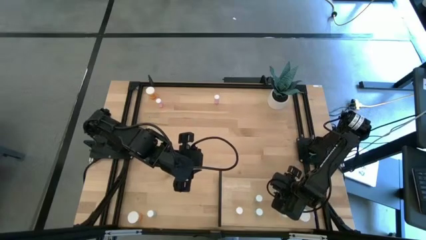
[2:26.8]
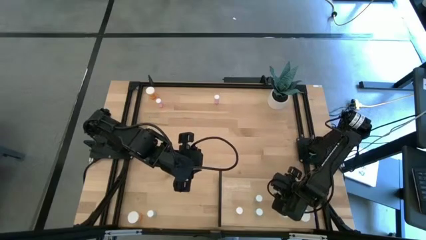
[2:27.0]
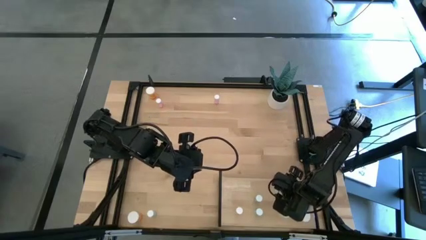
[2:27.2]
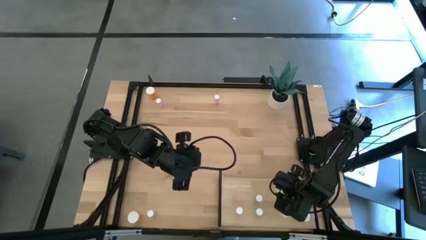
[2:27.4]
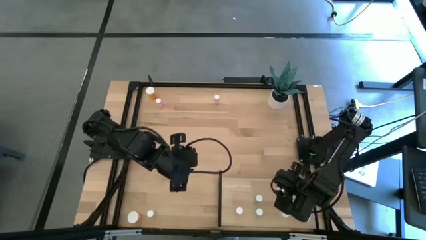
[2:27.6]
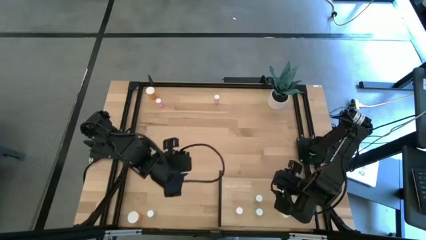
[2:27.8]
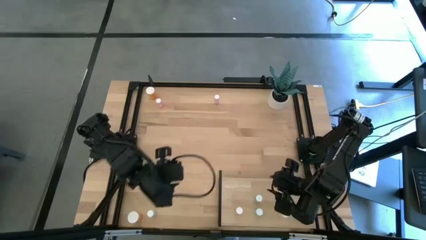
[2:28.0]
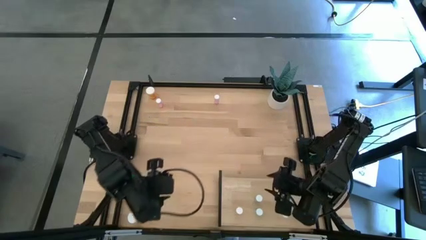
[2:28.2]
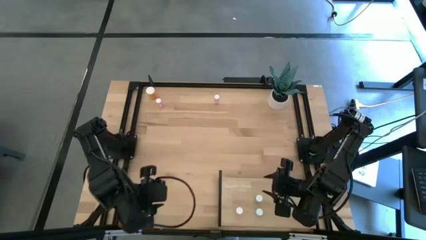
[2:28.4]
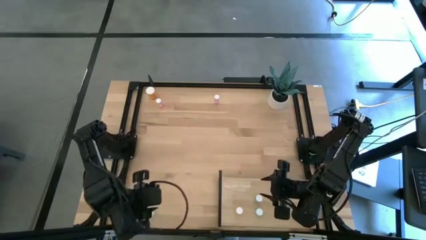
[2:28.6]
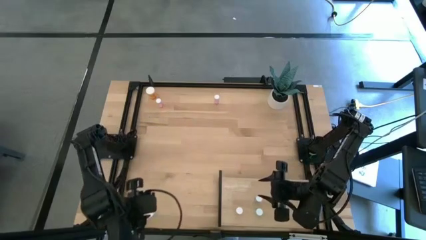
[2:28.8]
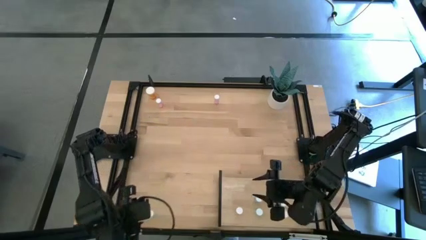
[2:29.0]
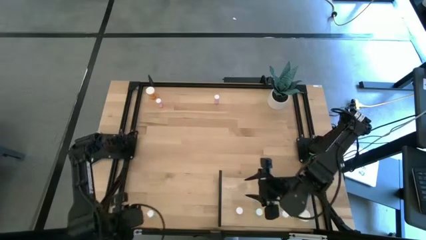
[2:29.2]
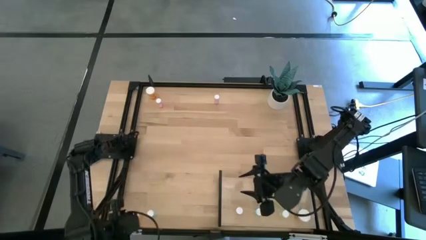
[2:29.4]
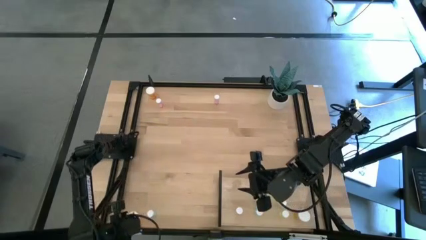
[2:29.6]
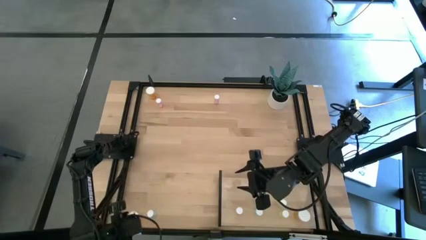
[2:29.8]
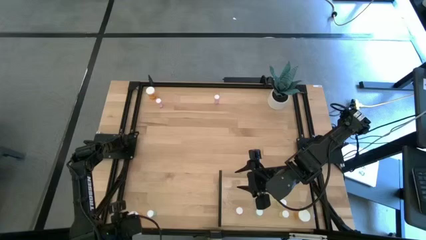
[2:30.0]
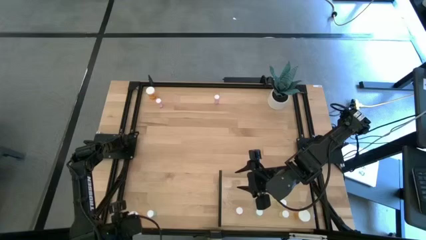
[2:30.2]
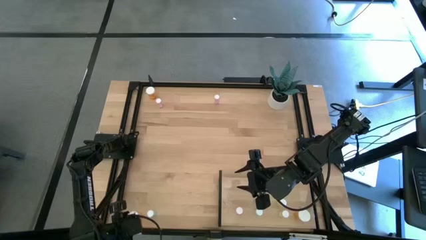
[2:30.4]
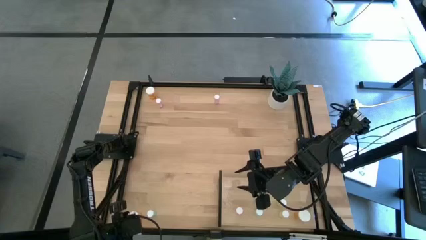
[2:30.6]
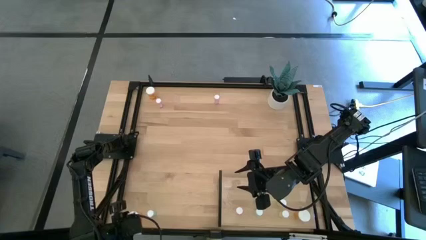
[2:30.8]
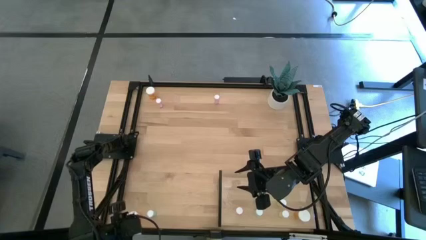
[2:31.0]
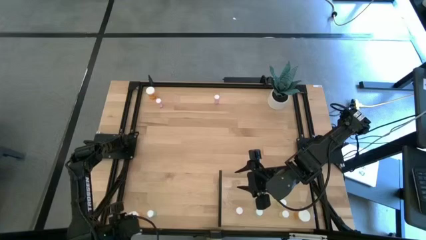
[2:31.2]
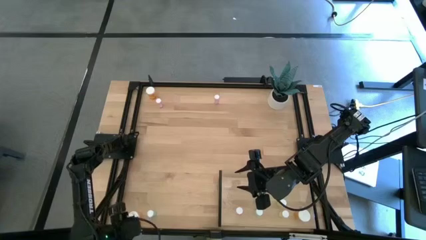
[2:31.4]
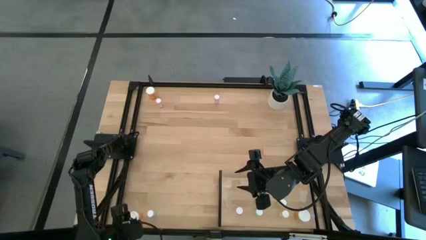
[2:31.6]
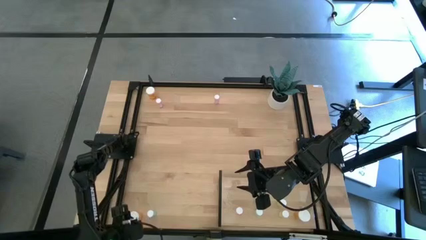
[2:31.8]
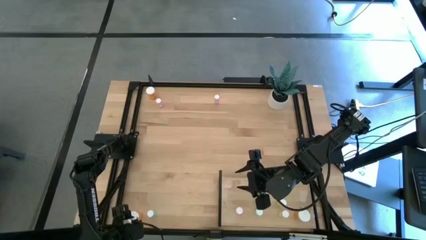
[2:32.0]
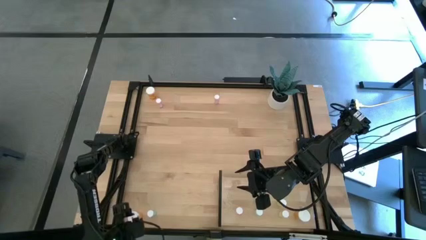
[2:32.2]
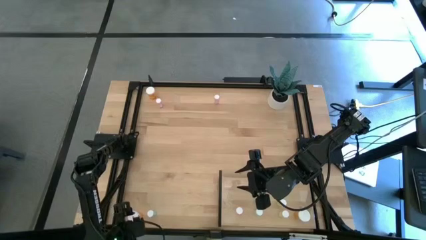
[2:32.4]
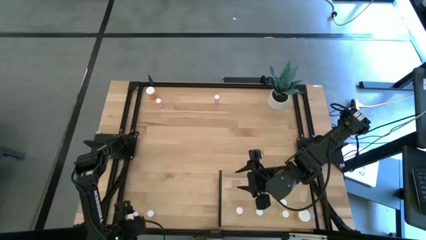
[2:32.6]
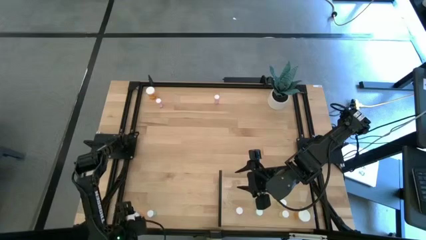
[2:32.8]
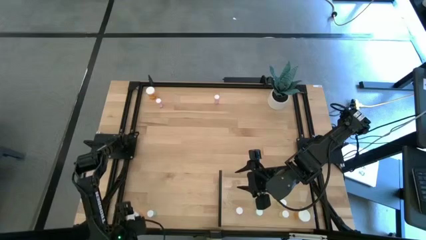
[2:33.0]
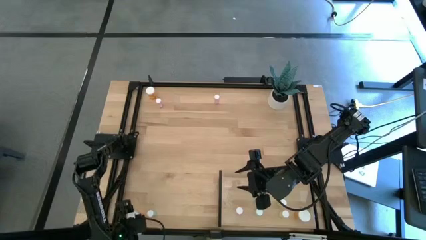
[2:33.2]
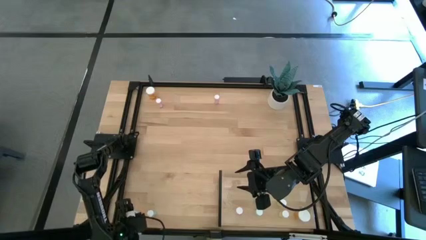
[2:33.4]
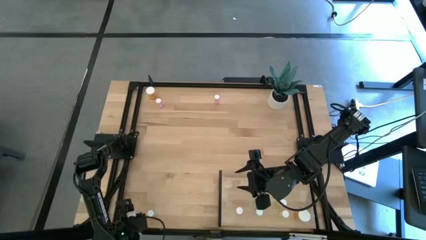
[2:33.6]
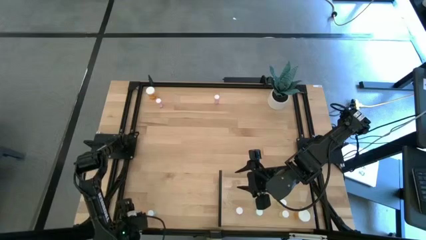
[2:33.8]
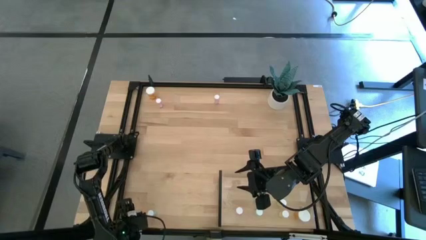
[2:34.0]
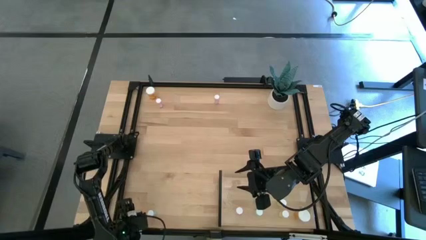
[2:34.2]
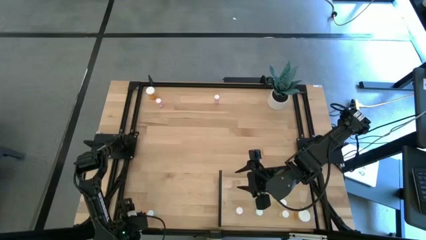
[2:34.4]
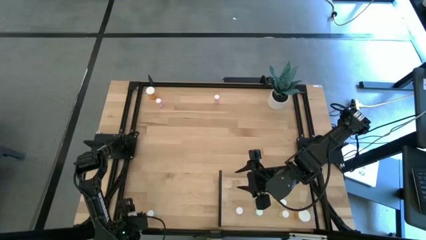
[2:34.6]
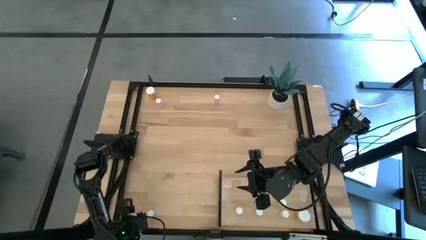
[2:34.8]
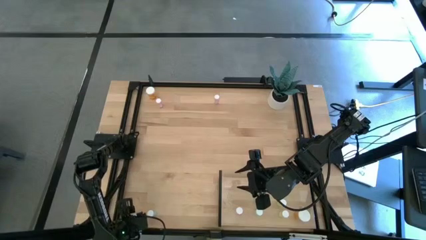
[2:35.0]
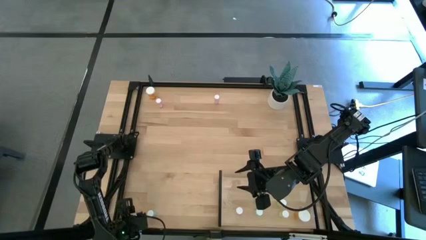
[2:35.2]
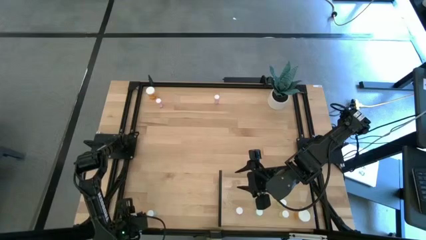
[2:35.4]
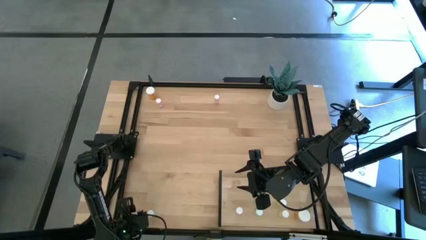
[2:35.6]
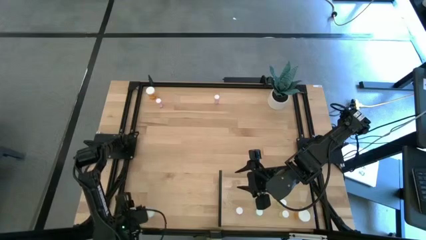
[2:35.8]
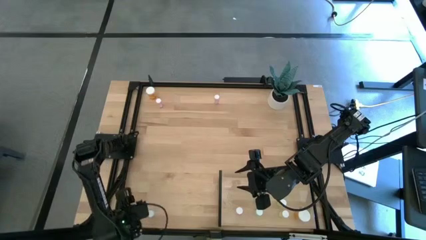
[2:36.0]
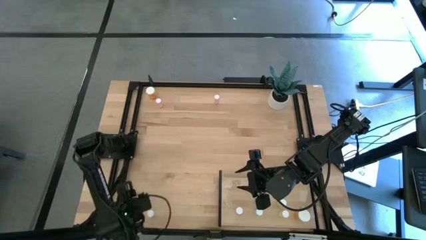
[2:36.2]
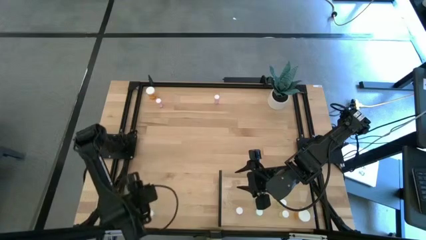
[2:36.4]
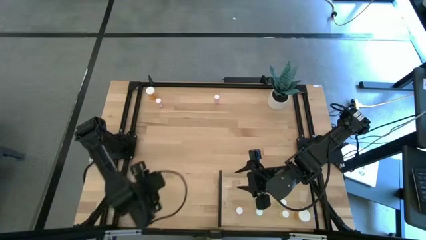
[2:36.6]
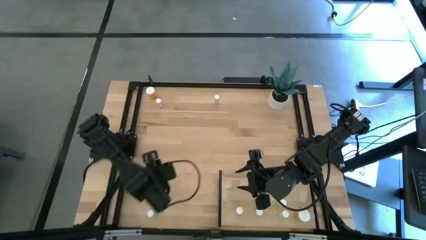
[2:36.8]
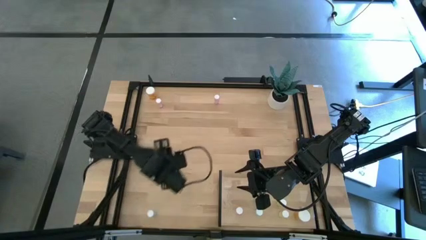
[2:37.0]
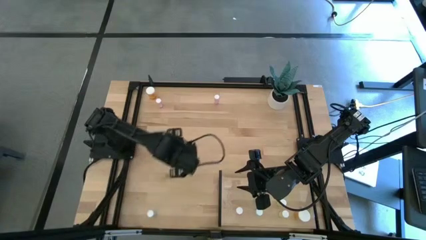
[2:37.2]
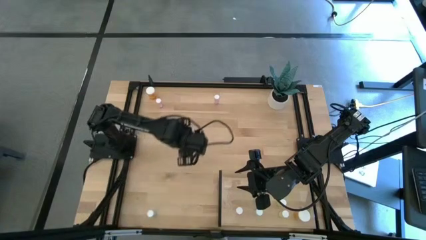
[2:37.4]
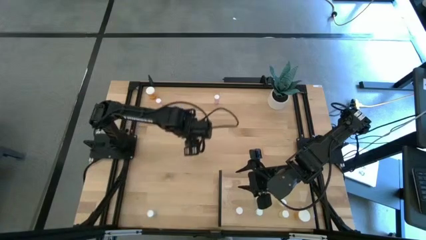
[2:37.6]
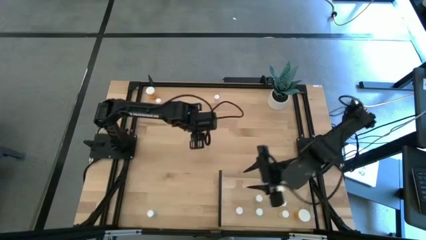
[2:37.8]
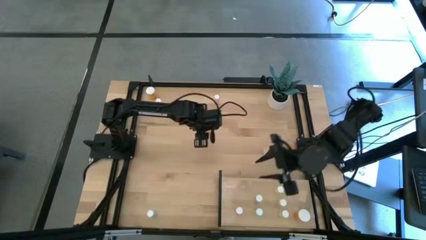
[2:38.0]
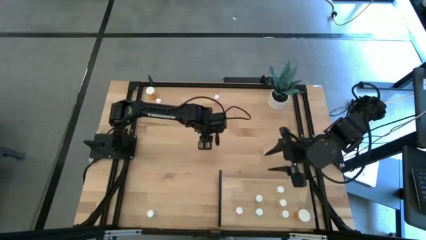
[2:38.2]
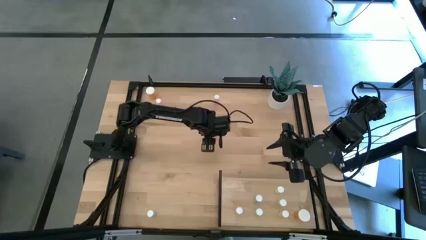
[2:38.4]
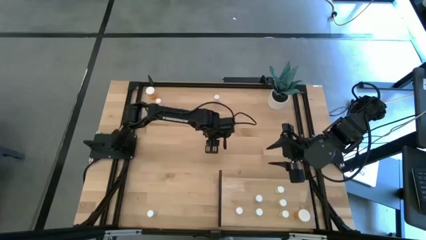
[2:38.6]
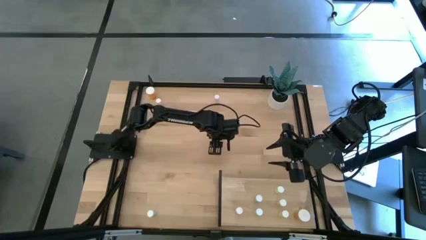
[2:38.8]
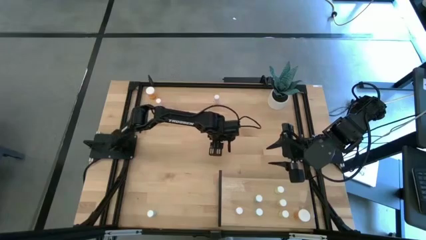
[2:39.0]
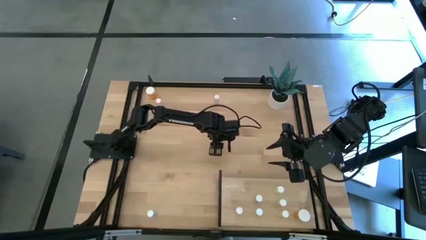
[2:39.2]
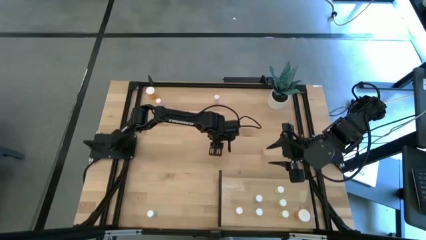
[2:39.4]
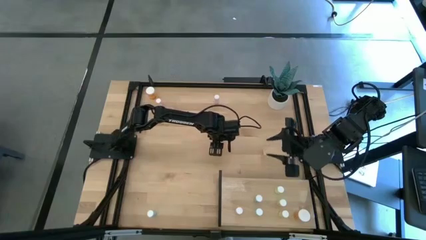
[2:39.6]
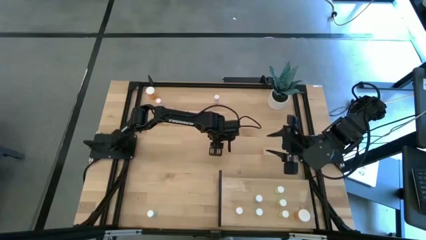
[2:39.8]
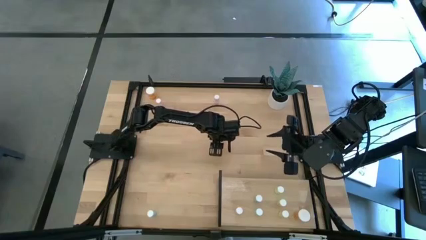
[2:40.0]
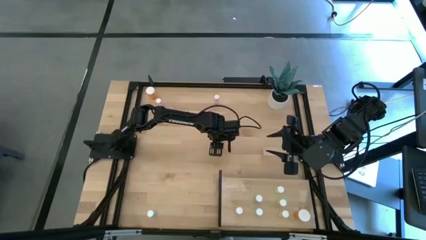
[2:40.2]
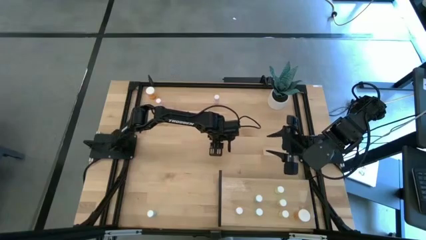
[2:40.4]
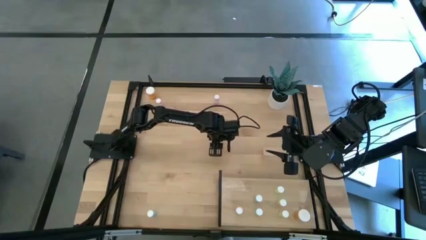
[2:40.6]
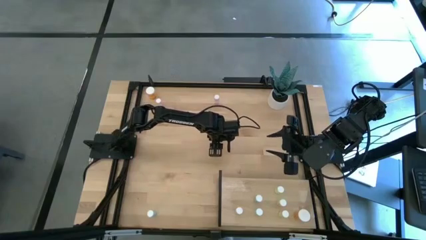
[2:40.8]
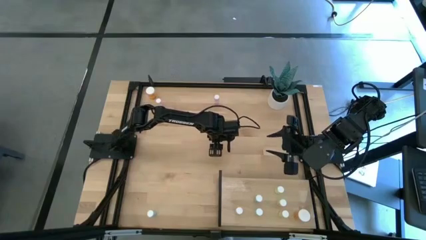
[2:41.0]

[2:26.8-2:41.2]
Task: Pick and place medicine bottles onto shelf by color
Put the orange pill bottle on the shelf aligned with the other orange pill bottle

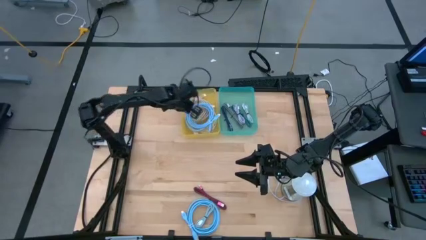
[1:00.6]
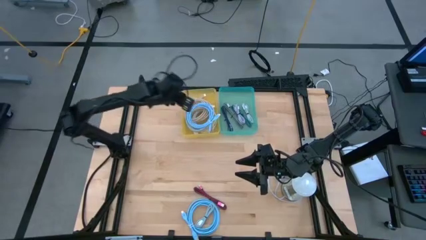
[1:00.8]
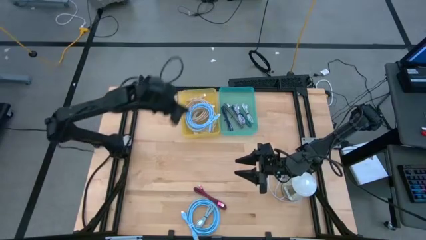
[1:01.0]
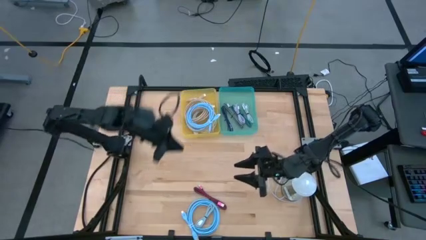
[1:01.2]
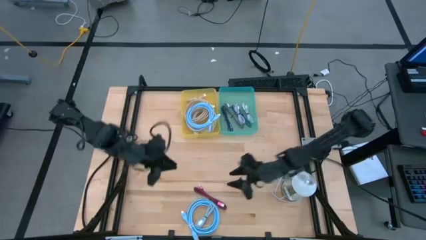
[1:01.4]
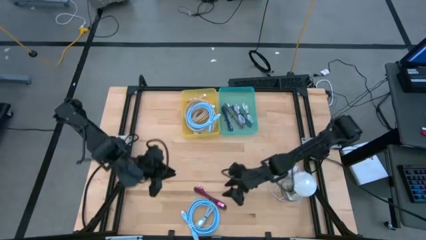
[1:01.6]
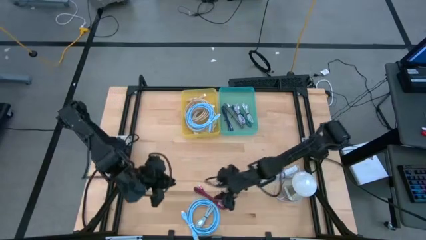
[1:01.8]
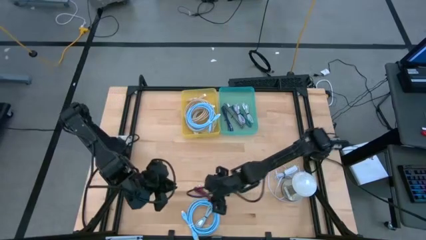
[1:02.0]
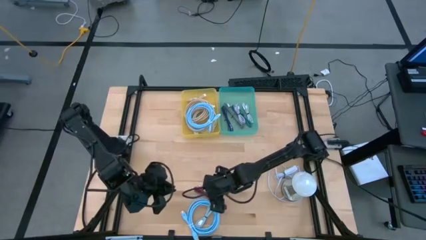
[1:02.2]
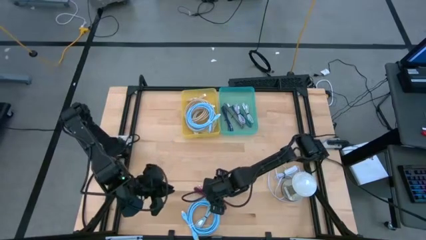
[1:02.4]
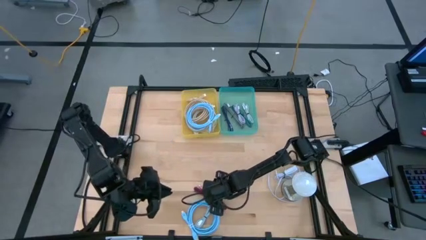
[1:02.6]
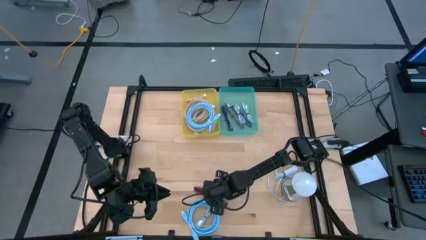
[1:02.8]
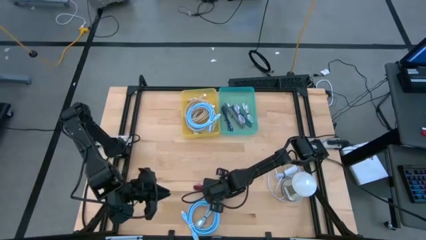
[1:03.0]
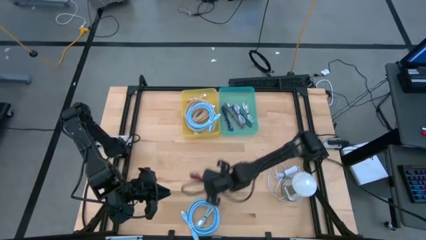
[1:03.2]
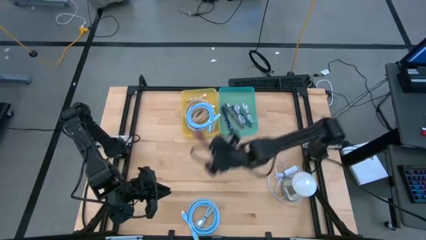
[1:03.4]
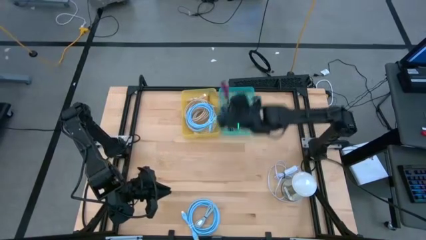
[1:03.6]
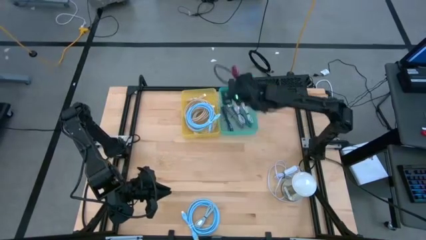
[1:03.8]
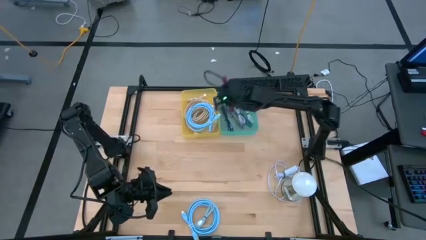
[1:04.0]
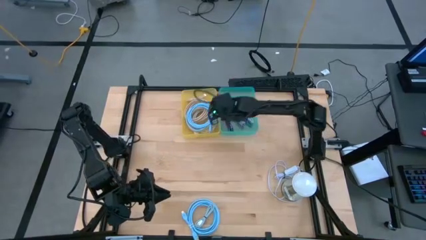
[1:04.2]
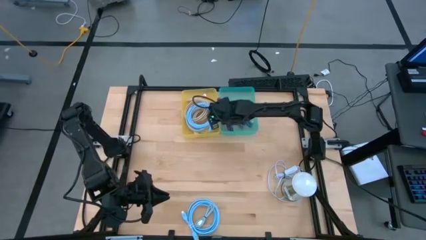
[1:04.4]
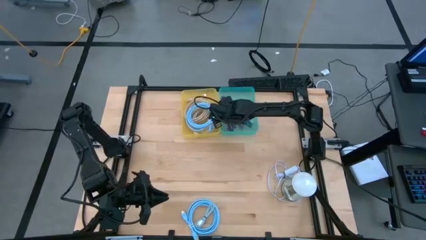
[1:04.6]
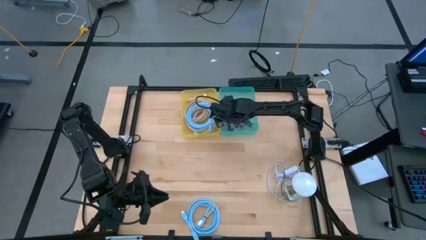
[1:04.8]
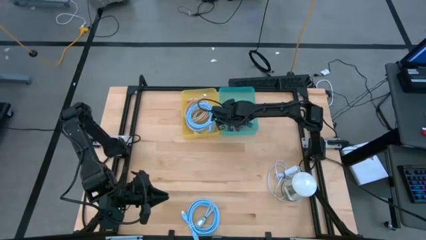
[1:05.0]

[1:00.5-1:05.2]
Task: Pick and place USB-C Cables
Put the small black and pink charger cable into the green bin
